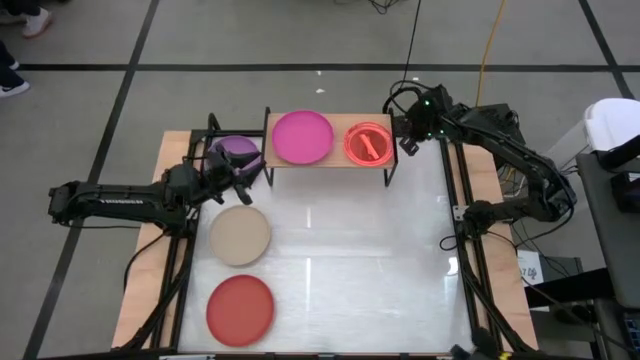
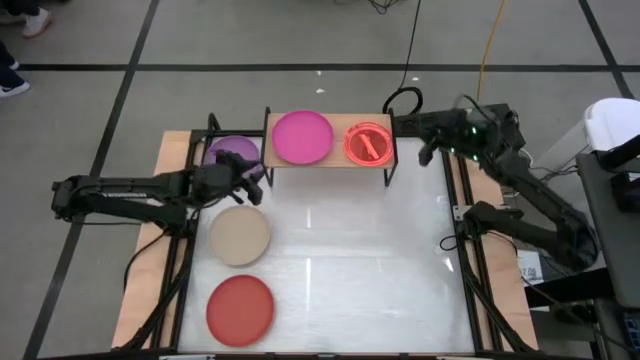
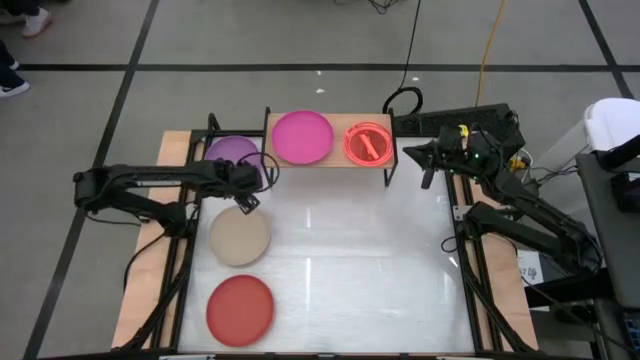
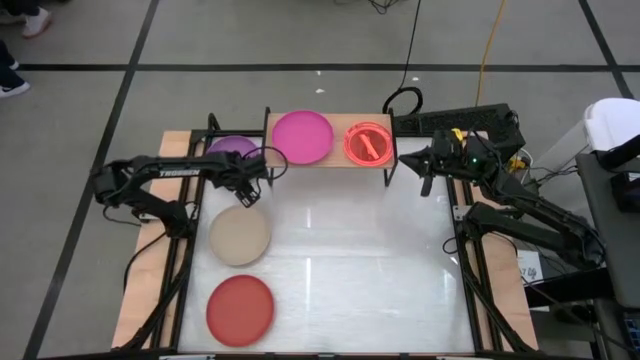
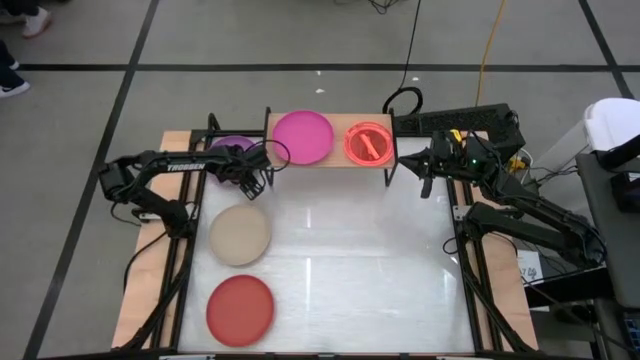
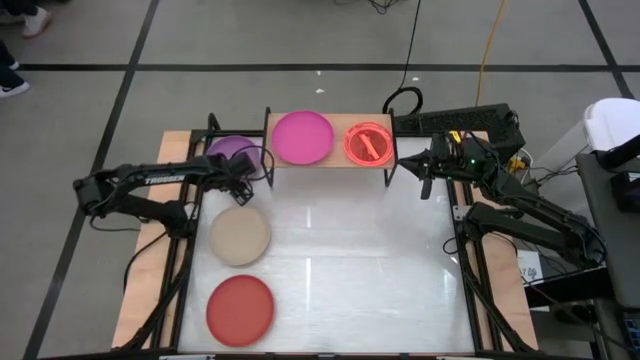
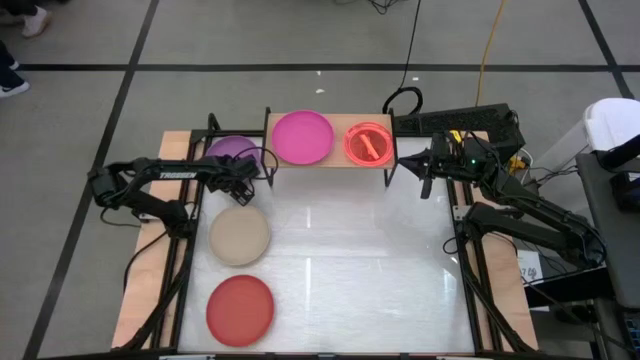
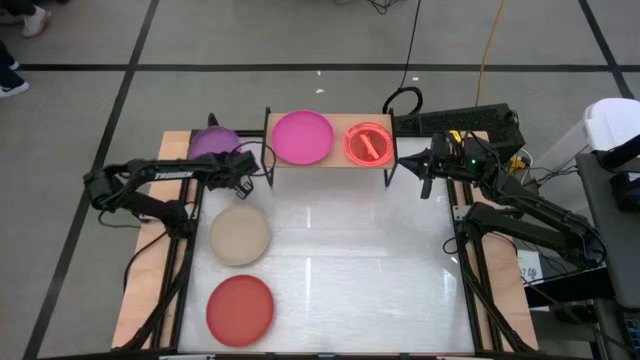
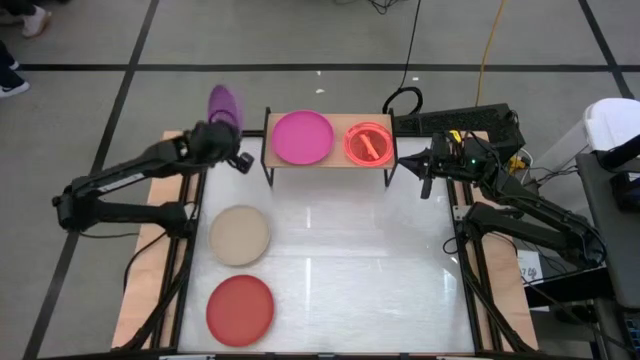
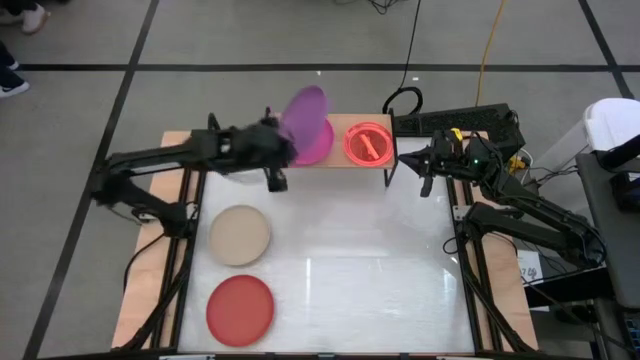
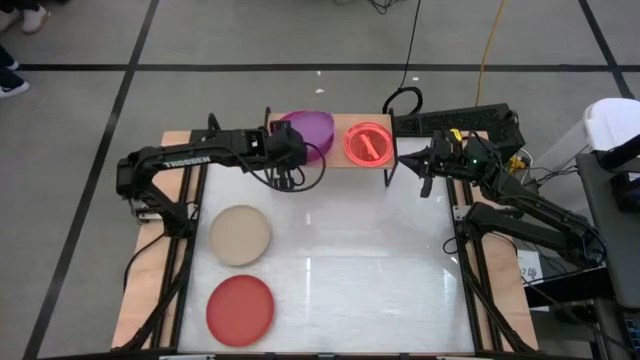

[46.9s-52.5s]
Task: Place and stack plates onto a shelf
Stack the large purple plate on top of the other large pink plate on the shelf

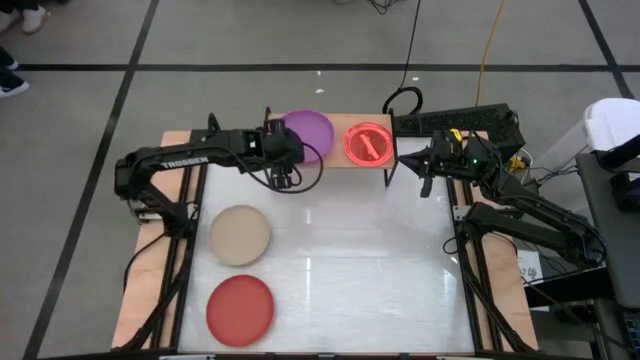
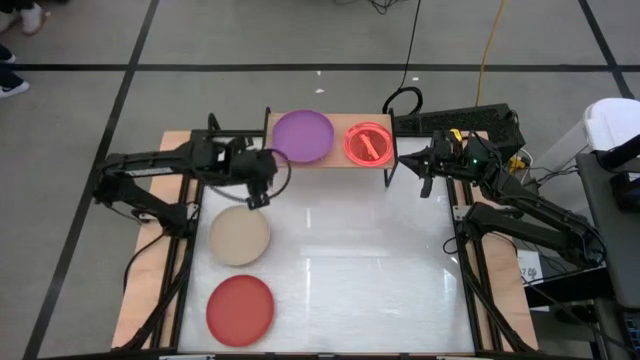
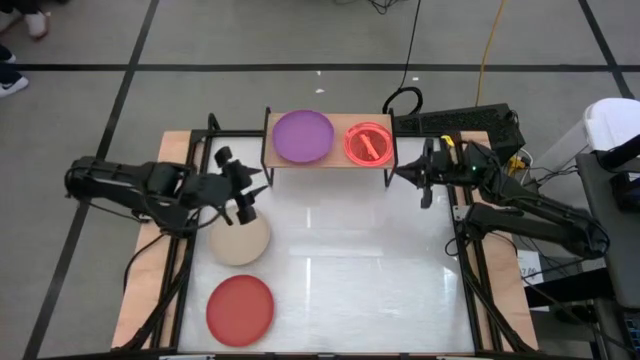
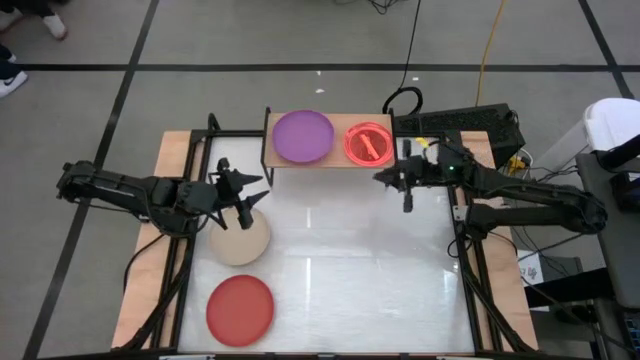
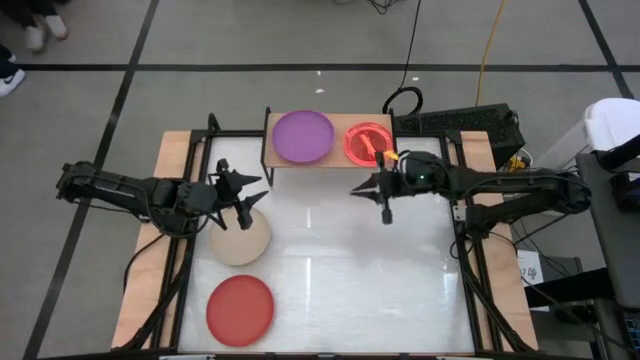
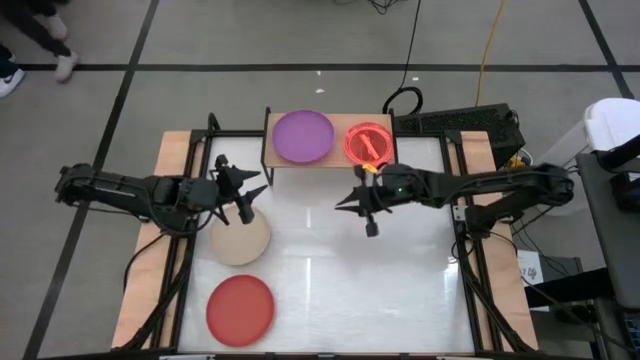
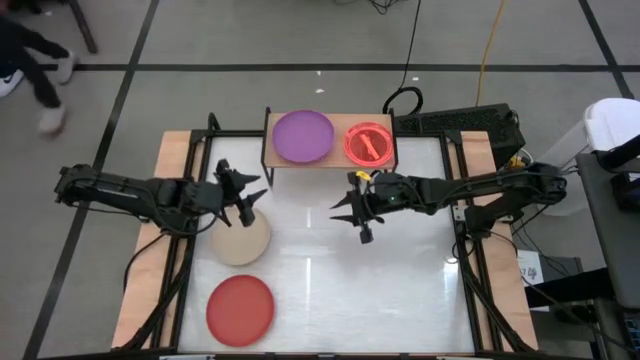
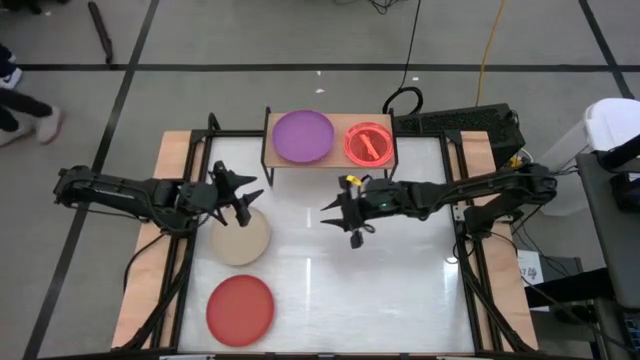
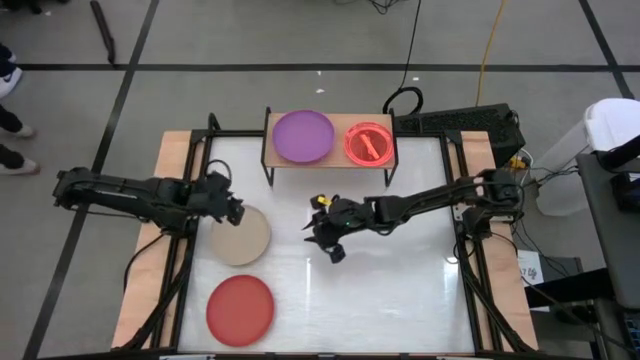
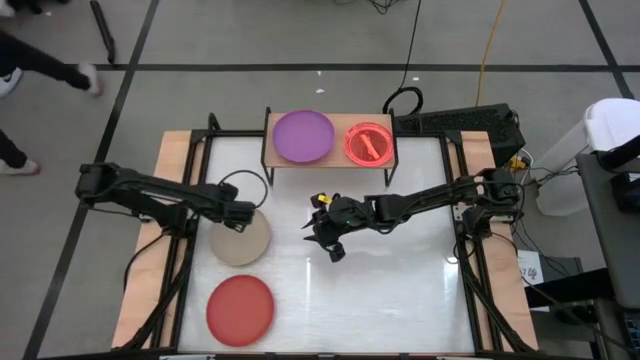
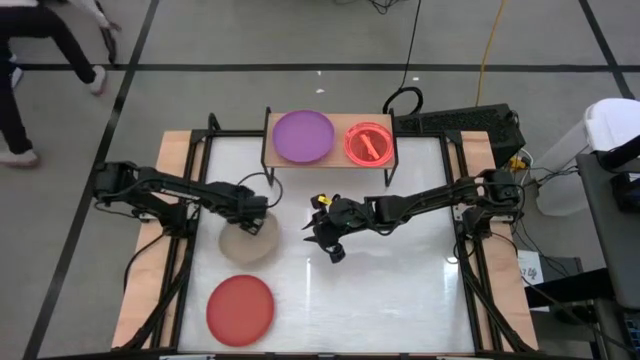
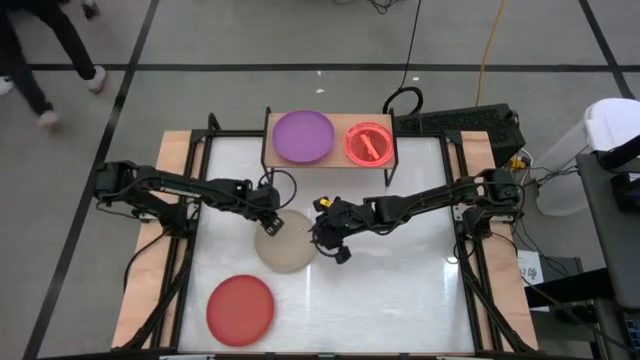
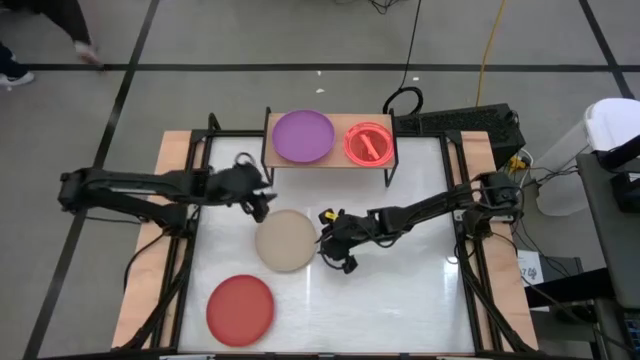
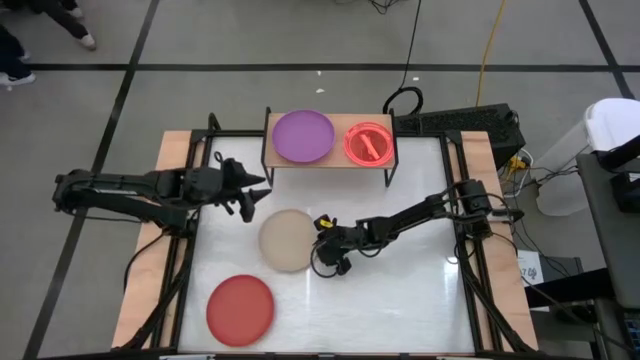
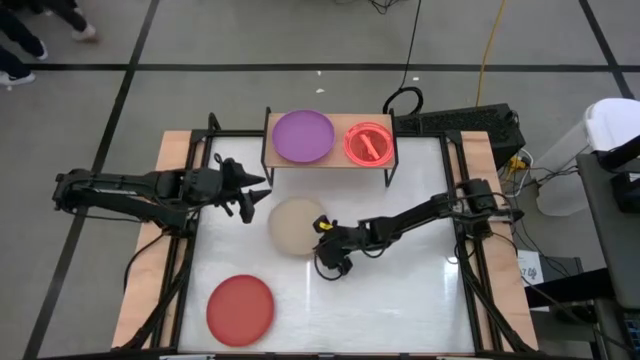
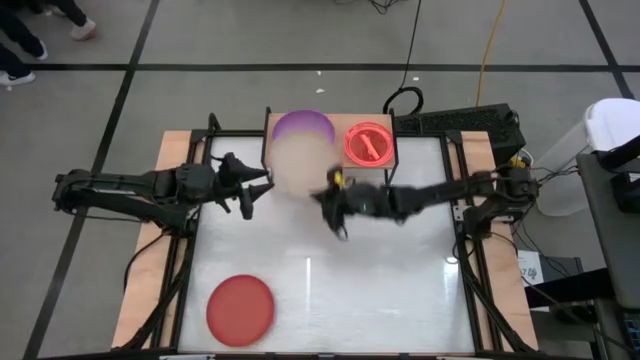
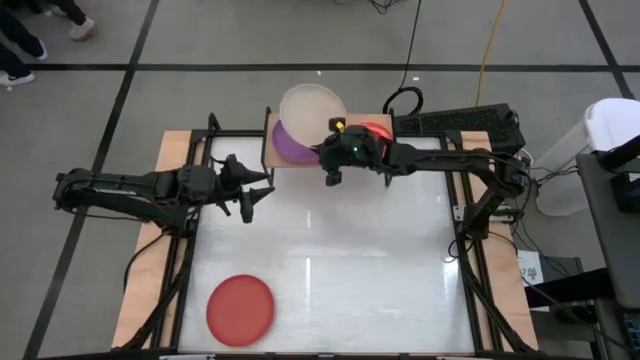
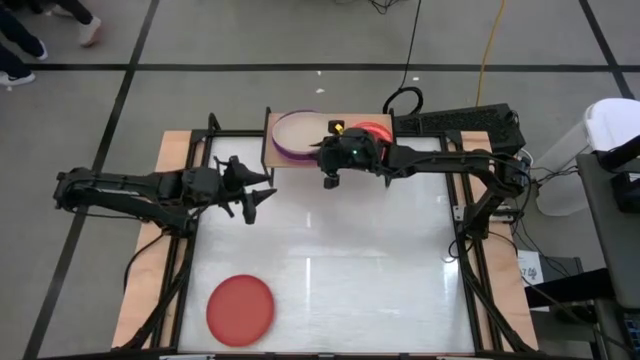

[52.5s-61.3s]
Stack the large brown plate on top of the other large purple plate on the shelf

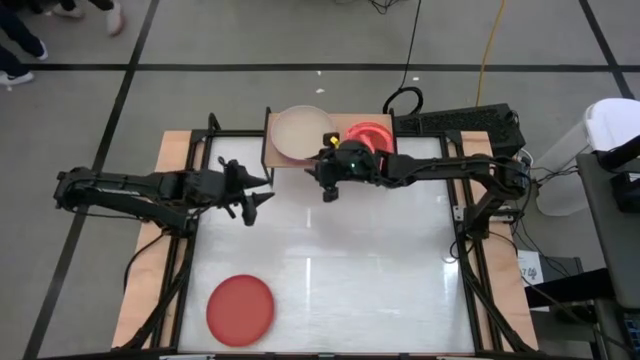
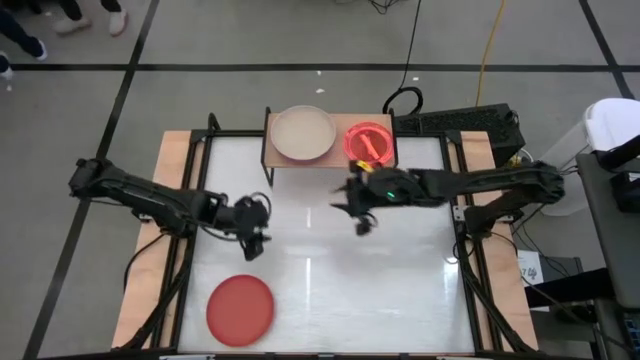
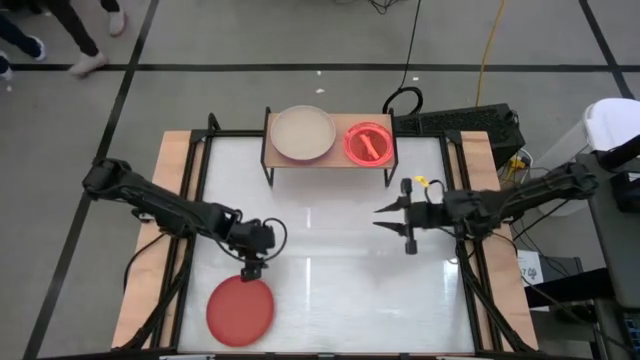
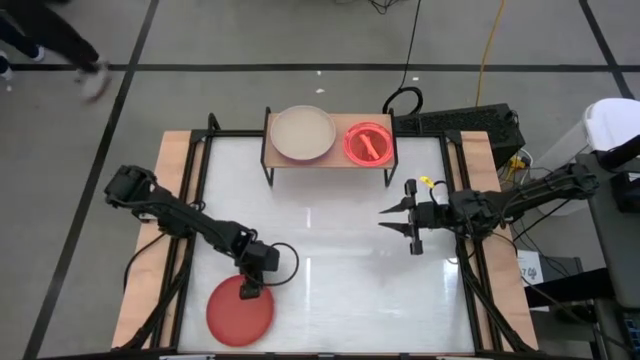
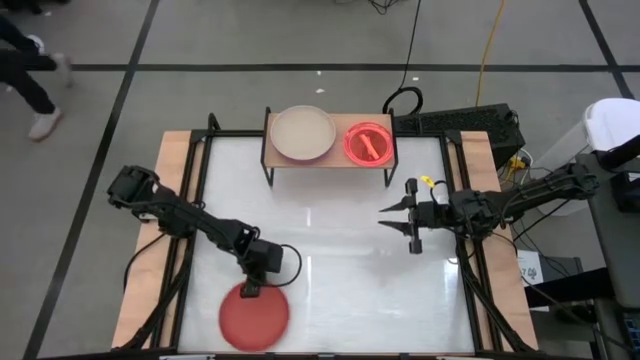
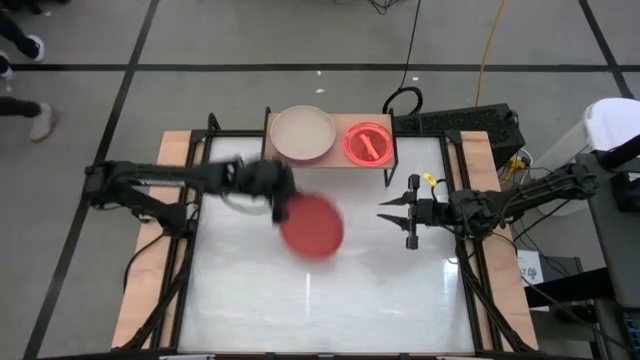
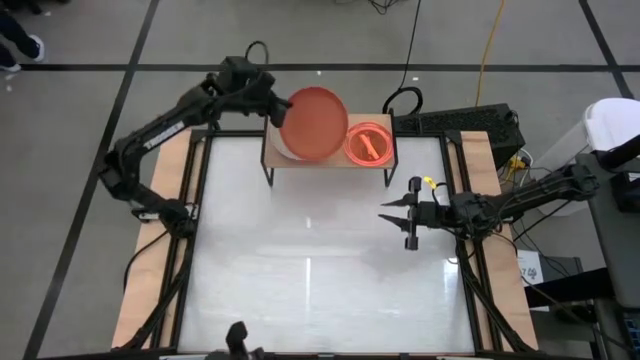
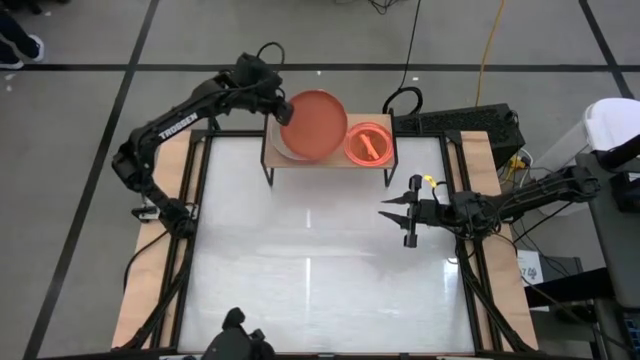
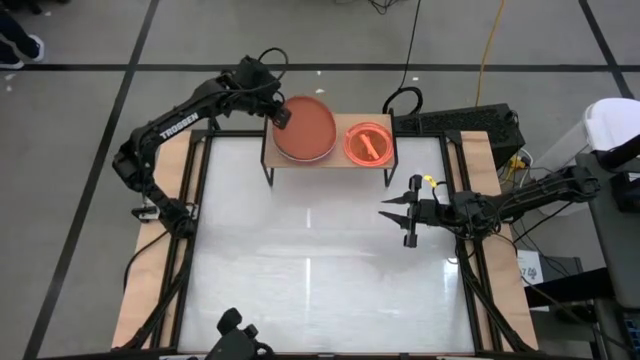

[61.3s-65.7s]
Stack the large orange plate on top of the other large brown plate on the shelf

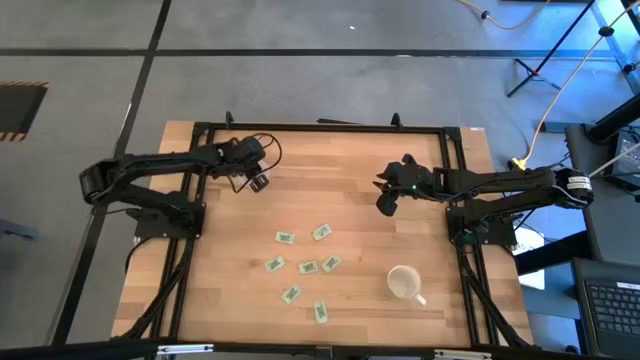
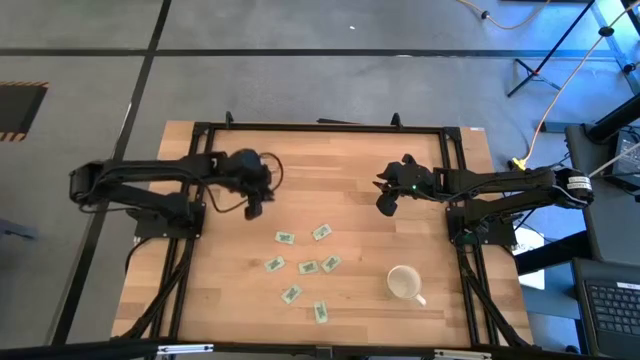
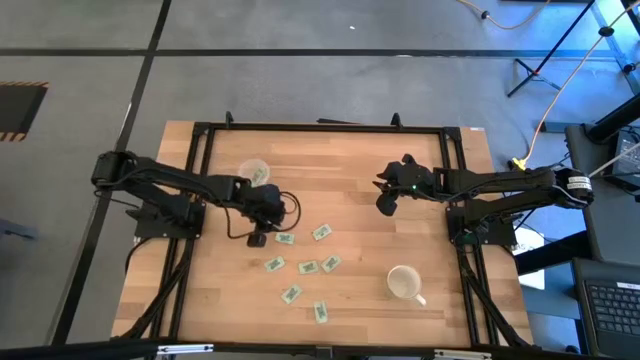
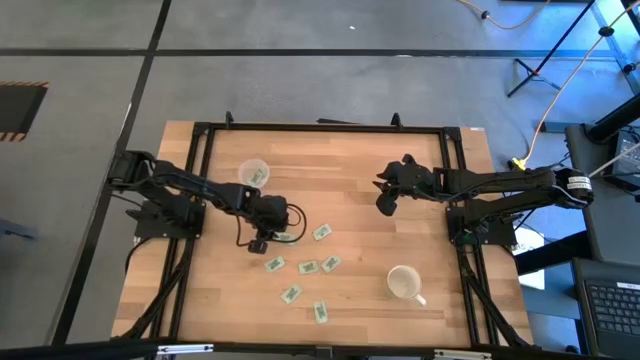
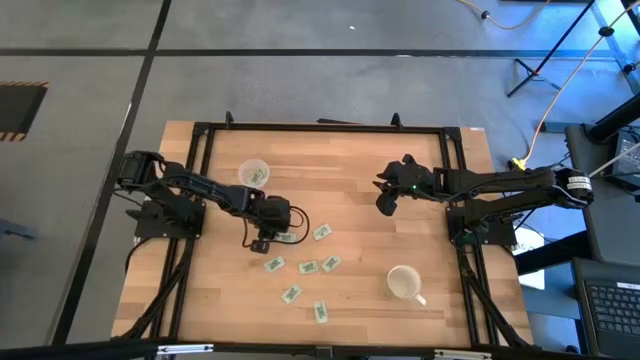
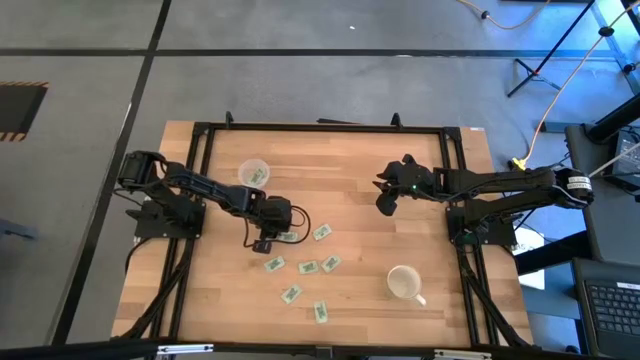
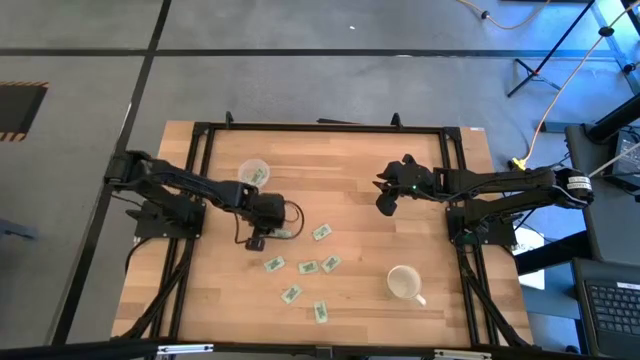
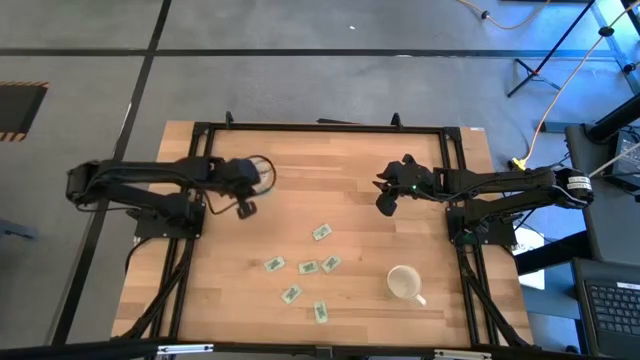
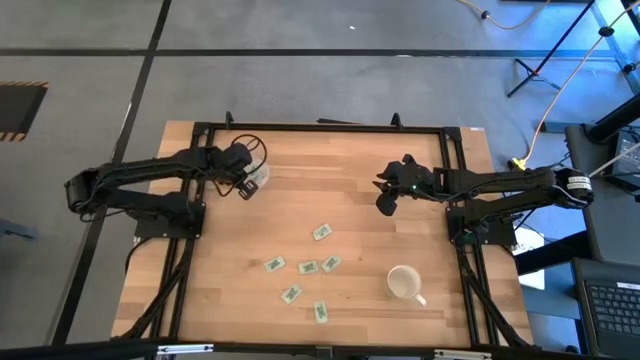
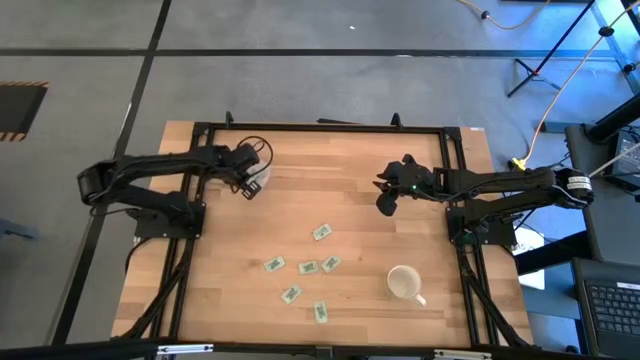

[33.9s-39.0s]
Task: Pick and place Stevia / Truvia into bins
Put the stevia packet into the left transparent container
